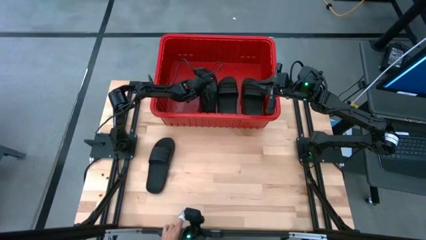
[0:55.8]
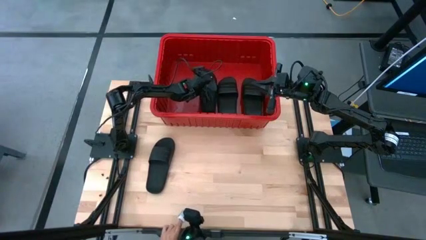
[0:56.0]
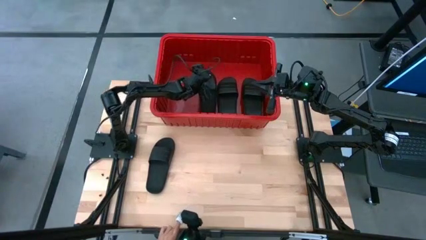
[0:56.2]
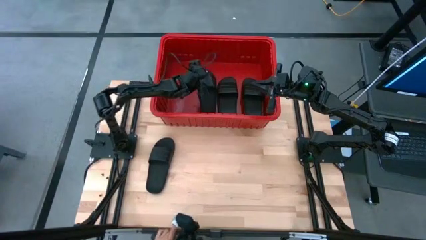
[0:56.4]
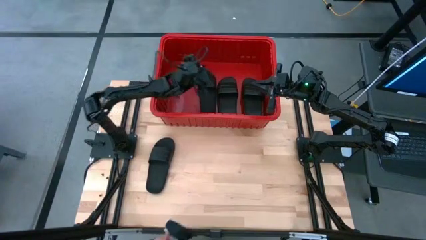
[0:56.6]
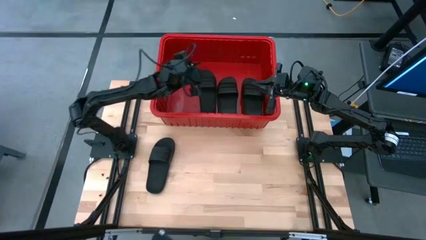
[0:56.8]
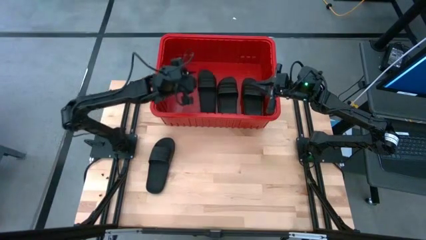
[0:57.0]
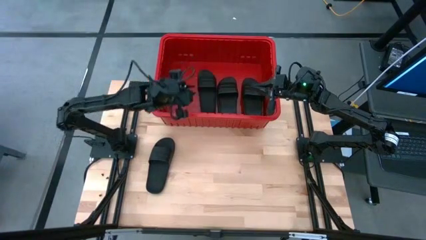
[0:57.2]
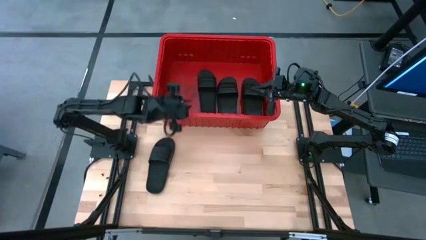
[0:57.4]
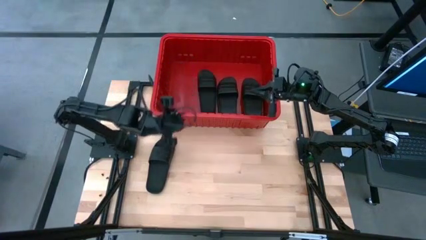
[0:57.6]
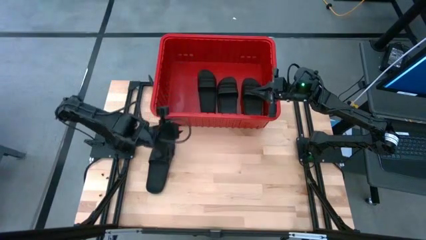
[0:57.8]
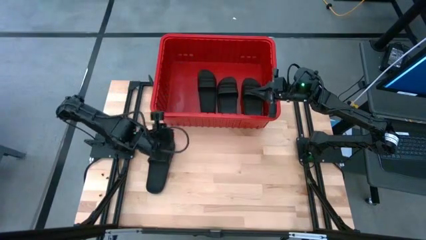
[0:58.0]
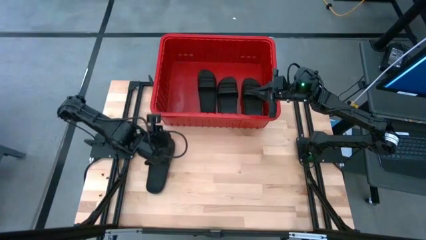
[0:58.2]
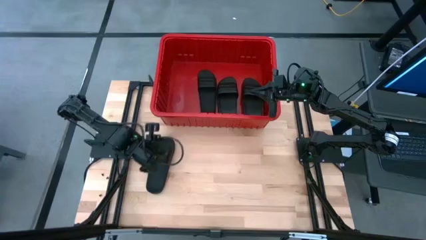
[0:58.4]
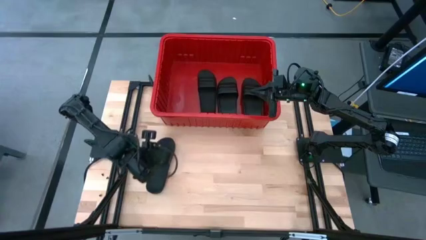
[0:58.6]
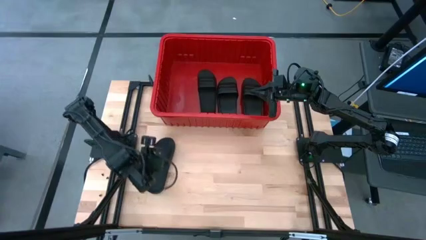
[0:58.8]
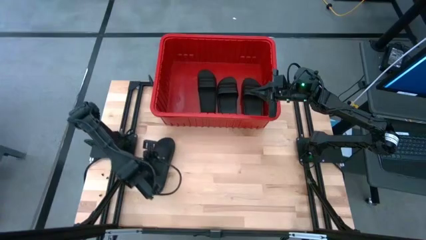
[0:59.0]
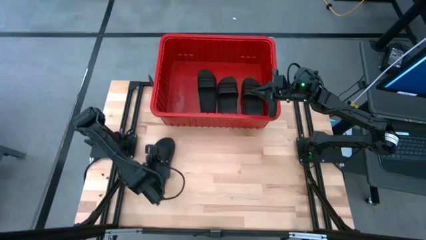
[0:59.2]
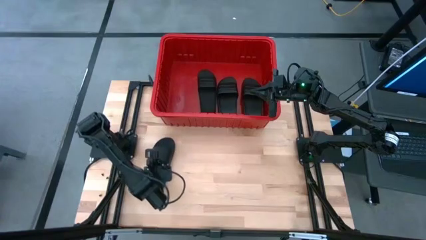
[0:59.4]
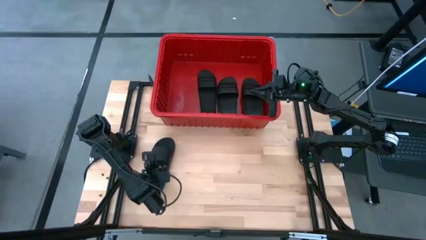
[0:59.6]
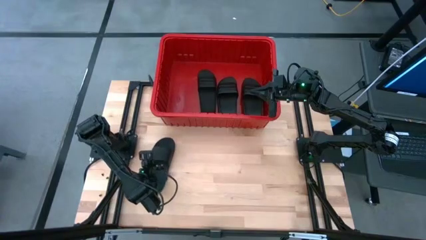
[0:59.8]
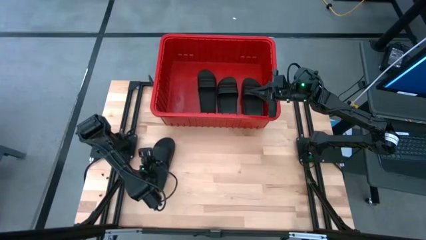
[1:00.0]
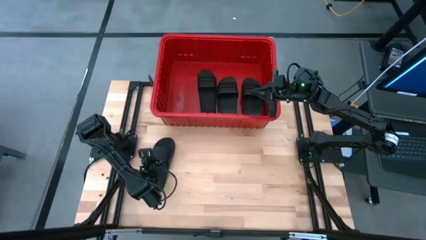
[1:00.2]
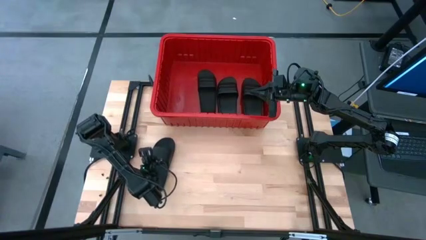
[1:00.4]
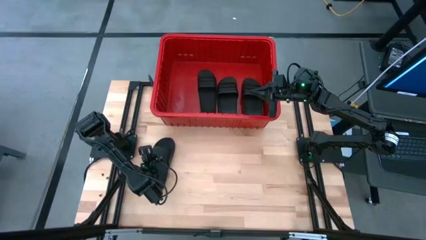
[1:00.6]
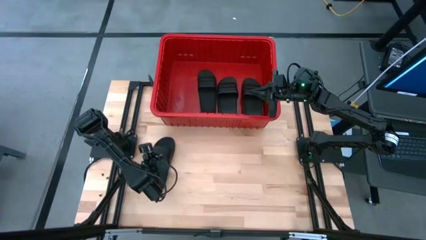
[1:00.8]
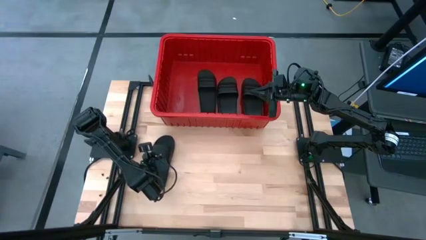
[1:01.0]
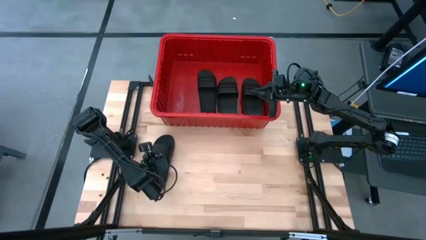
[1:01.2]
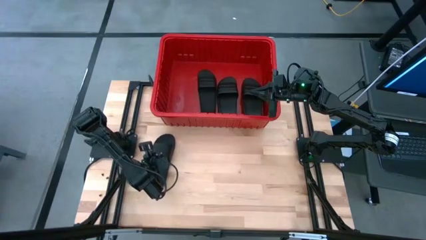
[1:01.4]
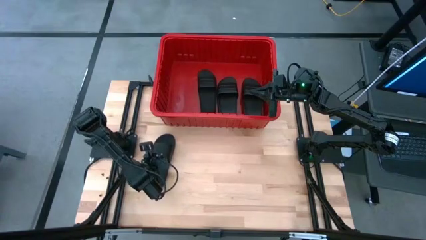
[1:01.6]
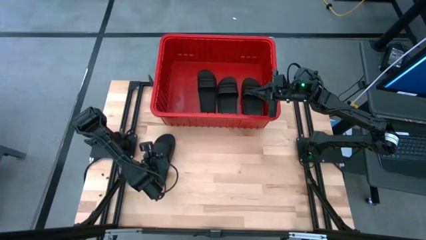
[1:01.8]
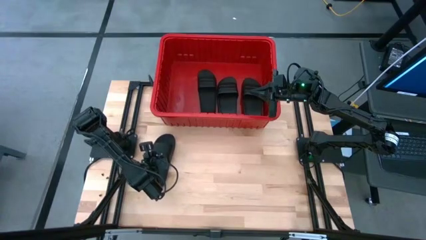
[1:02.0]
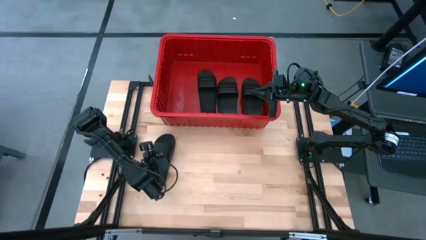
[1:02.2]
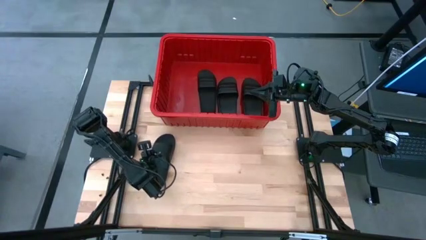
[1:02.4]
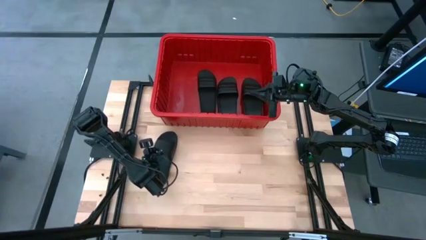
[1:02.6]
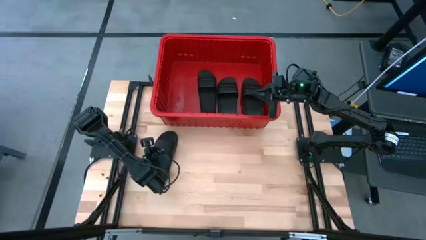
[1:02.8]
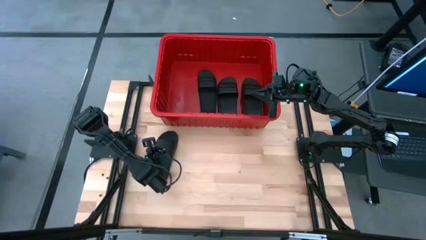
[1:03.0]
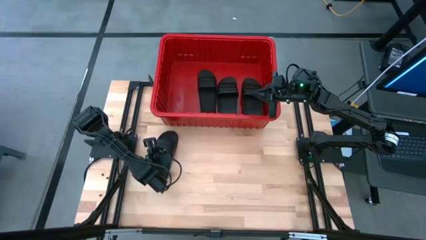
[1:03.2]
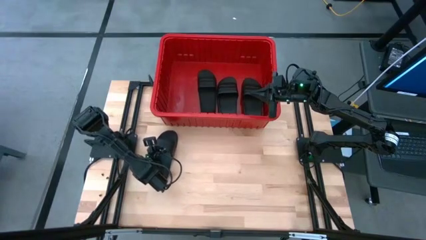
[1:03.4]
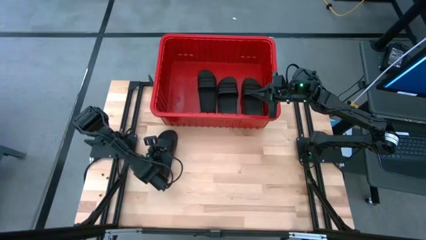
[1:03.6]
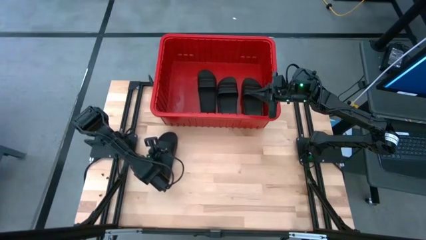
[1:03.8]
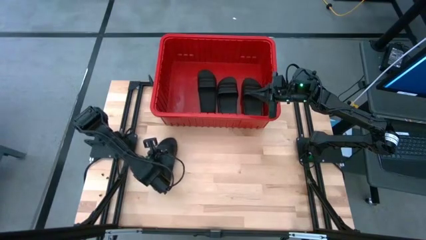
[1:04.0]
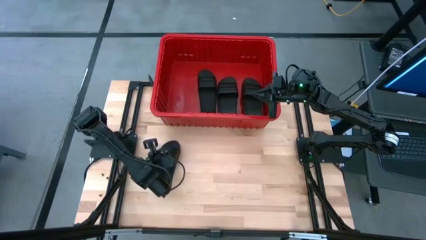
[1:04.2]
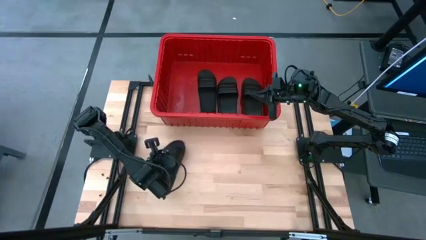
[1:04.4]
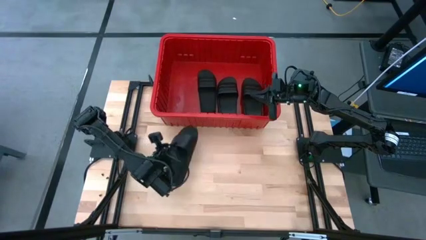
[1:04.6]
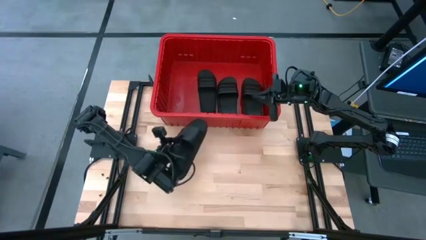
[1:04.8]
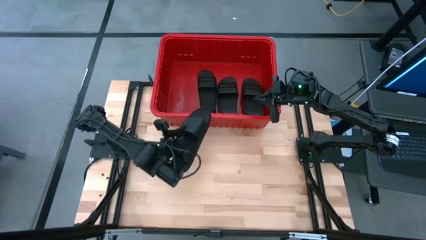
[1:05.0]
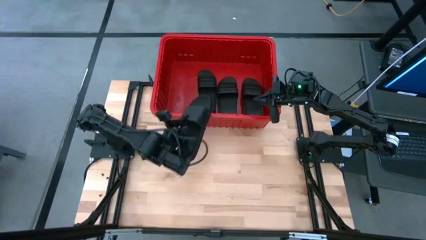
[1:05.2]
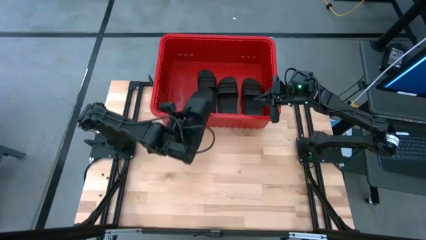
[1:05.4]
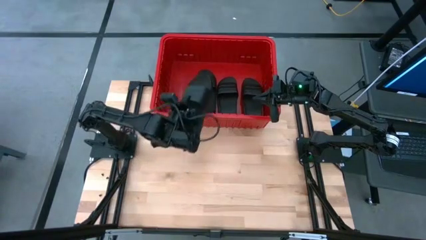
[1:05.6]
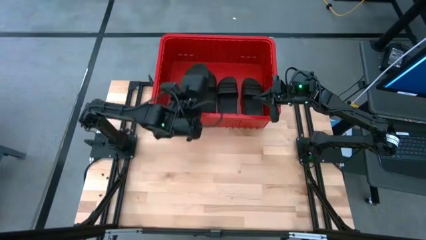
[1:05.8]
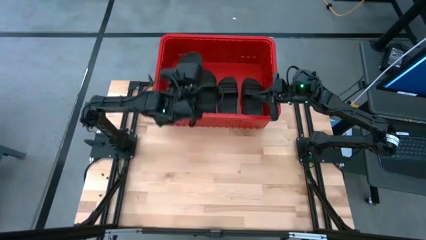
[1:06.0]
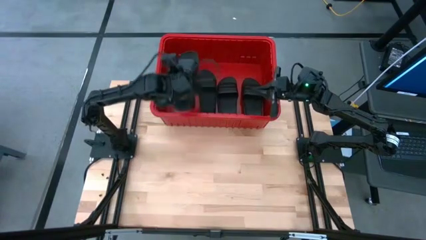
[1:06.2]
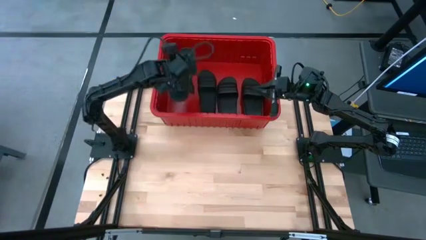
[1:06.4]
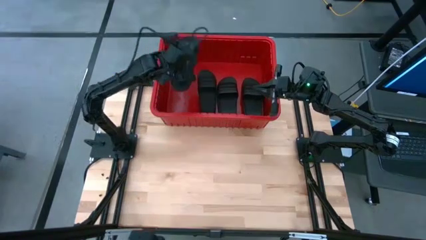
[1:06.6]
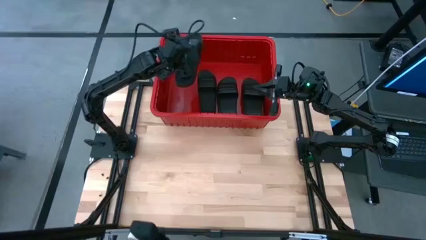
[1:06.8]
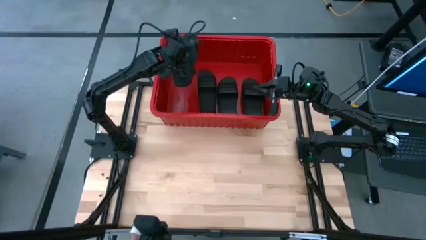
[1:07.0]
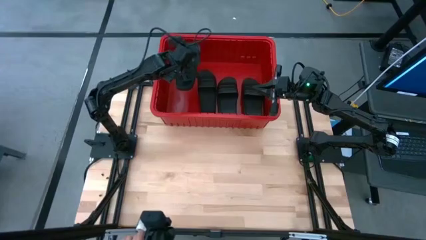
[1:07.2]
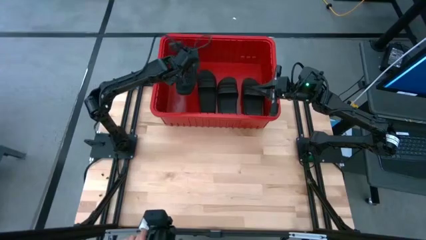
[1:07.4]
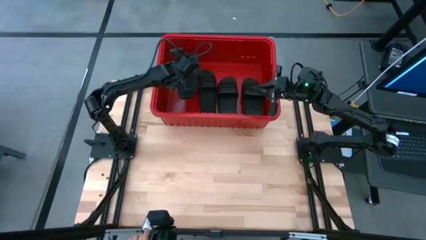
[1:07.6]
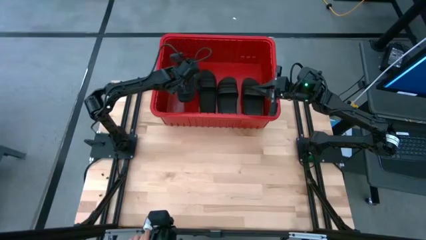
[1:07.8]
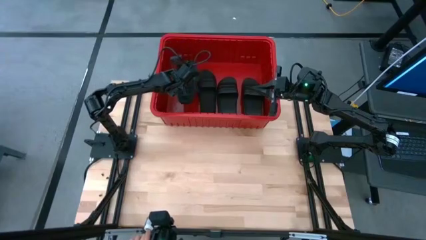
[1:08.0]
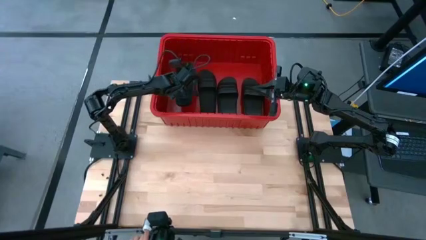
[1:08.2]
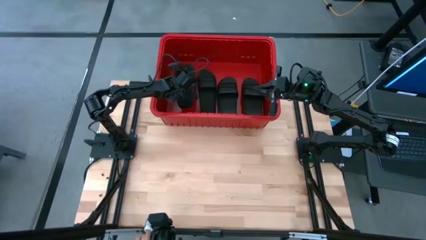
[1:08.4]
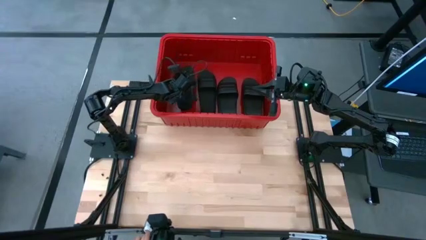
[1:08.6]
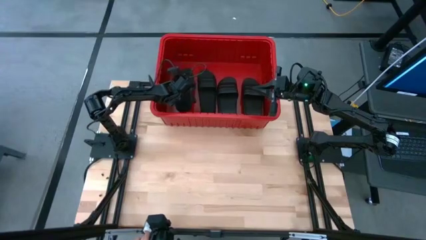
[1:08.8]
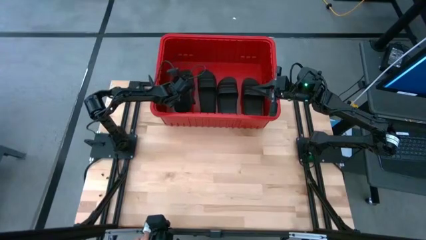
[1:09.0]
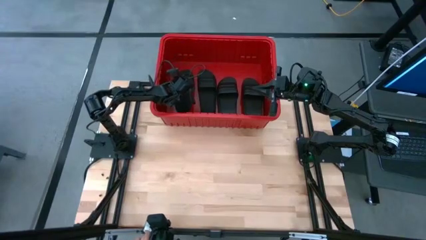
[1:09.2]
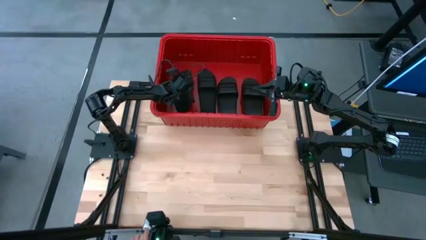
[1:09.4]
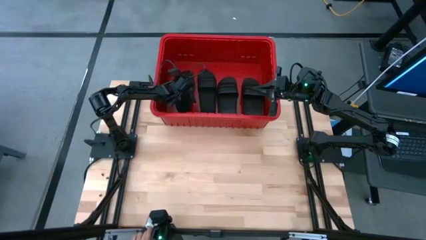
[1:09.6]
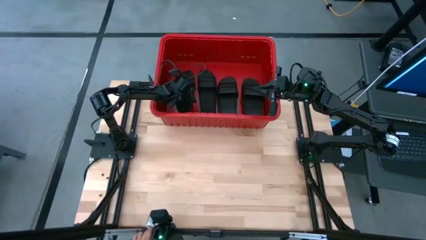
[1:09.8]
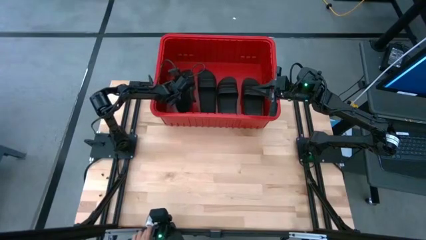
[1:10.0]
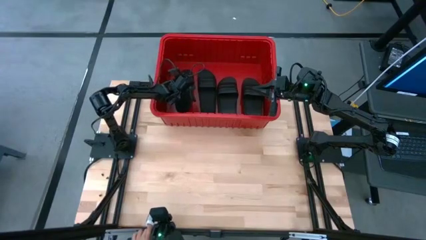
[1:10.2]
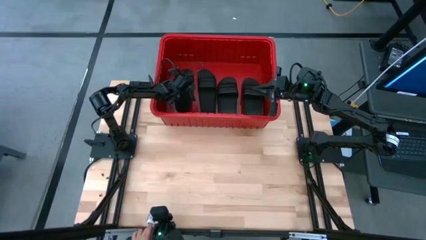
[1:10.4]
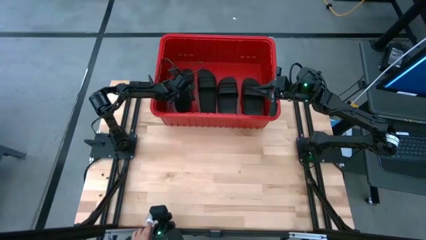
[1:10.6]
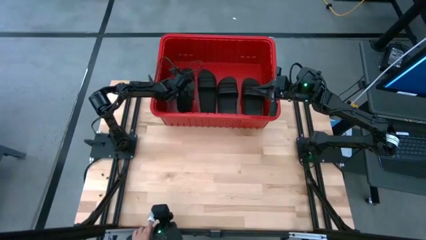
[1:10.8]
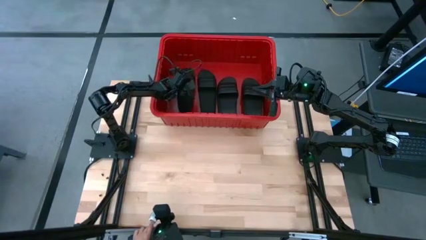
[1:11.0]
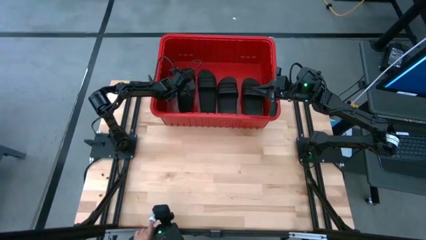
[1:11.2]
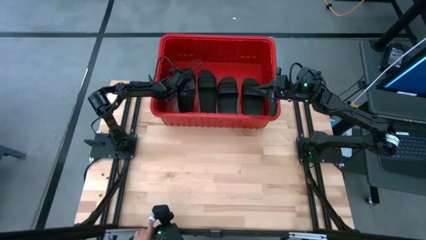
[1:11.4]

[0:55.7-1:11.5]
Task: Pick and place slides into bin
Put the right black slide into the red bin
